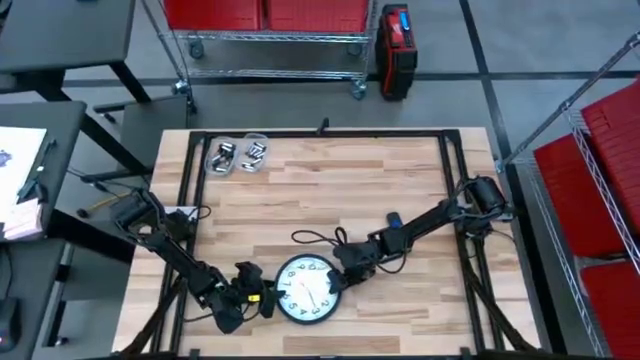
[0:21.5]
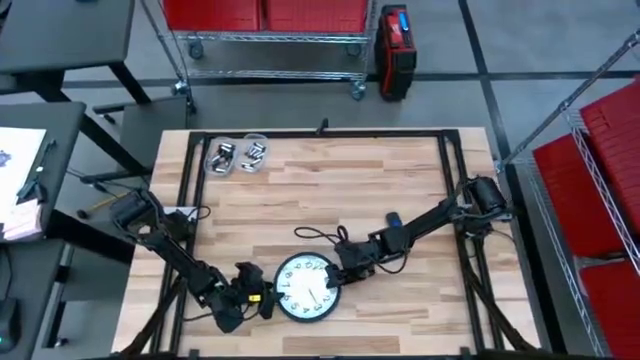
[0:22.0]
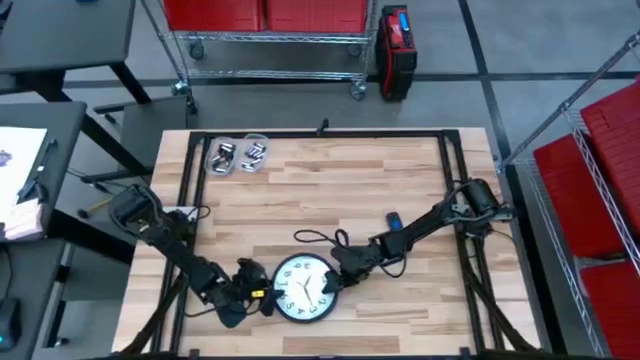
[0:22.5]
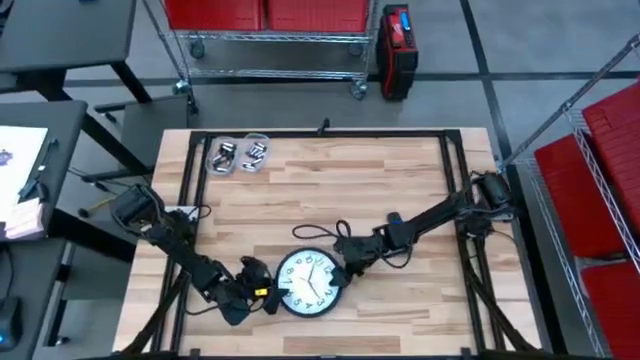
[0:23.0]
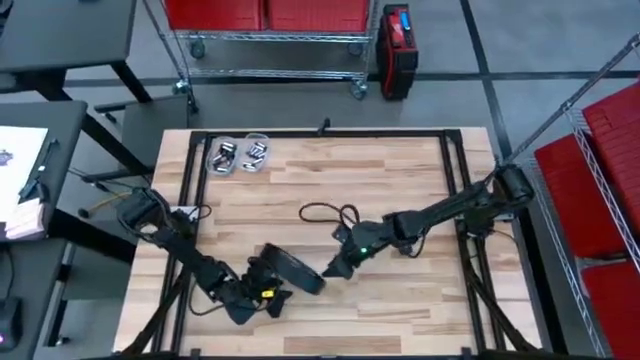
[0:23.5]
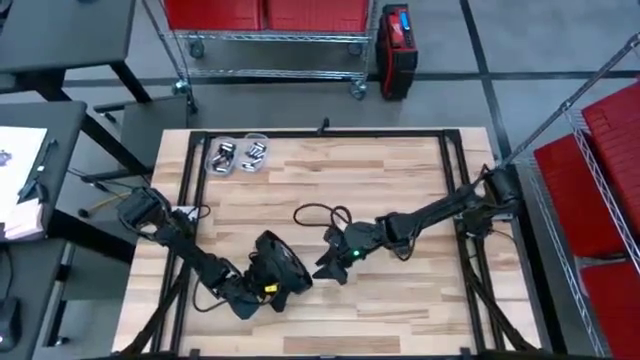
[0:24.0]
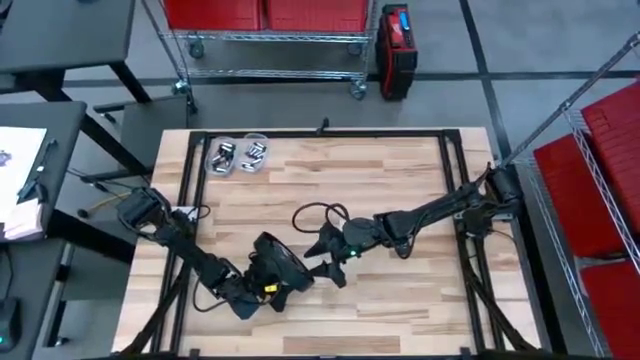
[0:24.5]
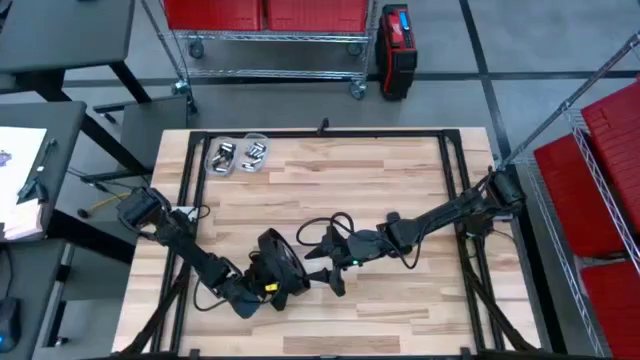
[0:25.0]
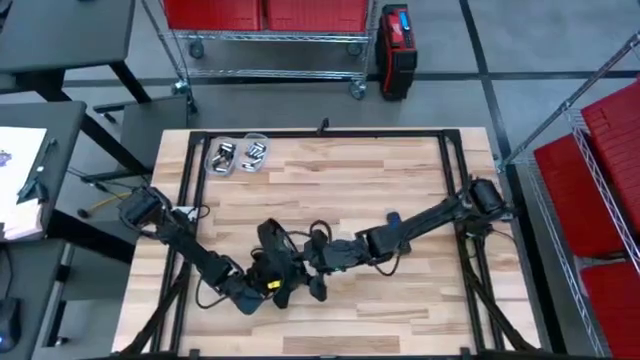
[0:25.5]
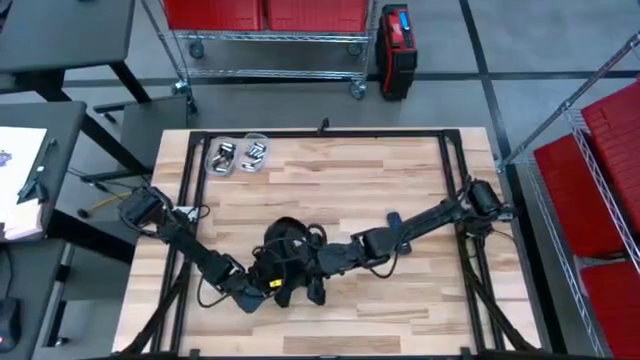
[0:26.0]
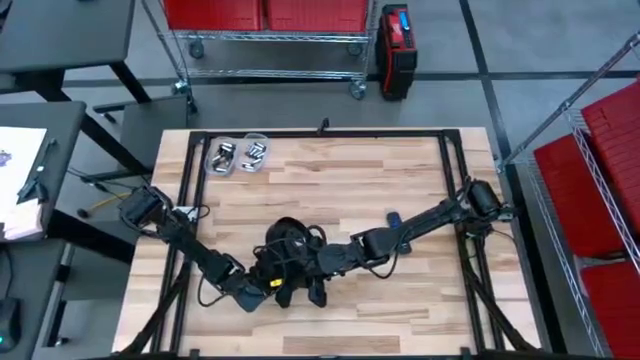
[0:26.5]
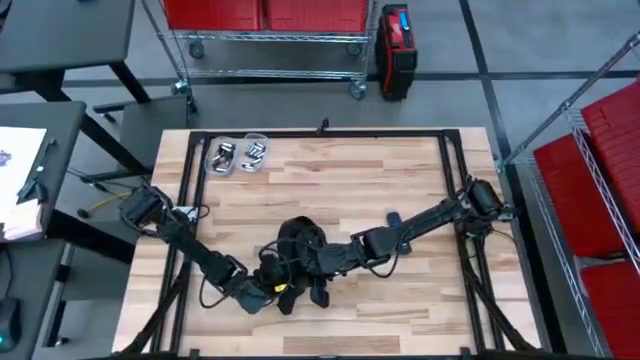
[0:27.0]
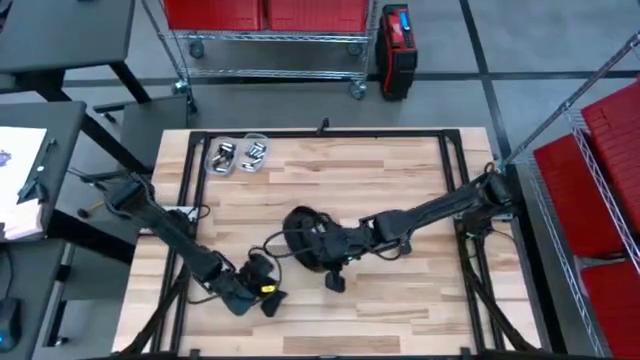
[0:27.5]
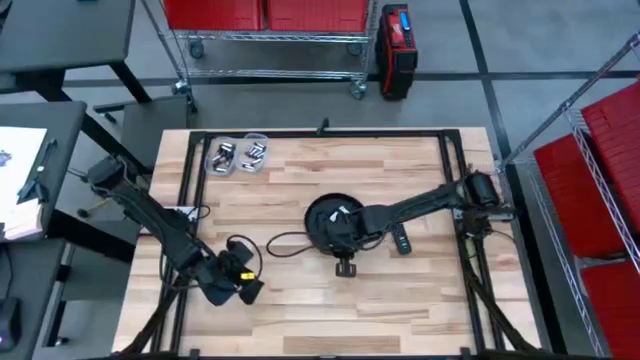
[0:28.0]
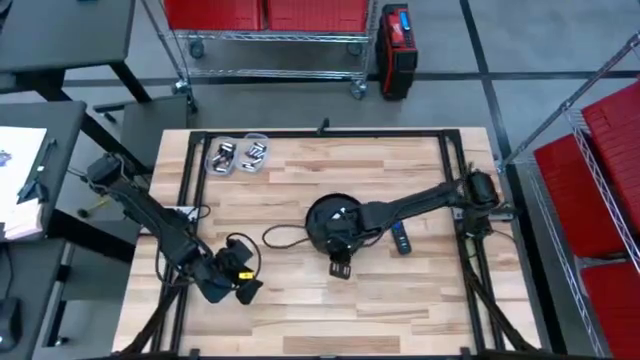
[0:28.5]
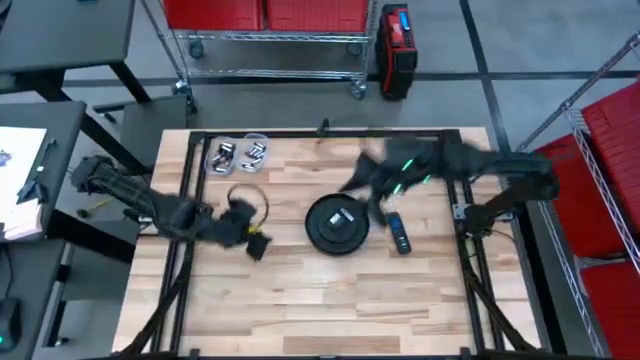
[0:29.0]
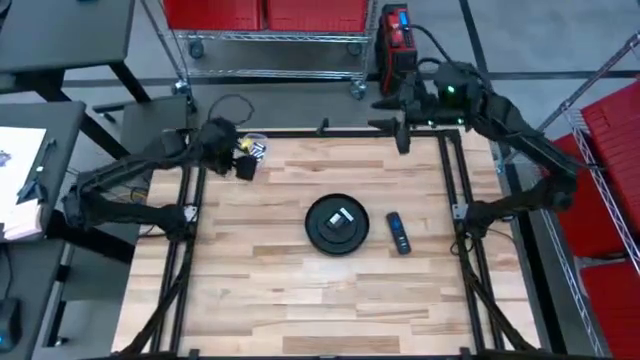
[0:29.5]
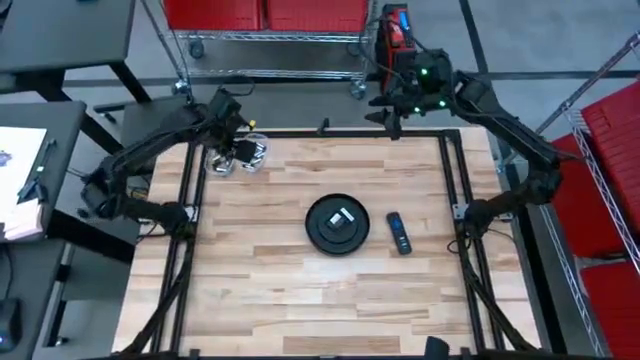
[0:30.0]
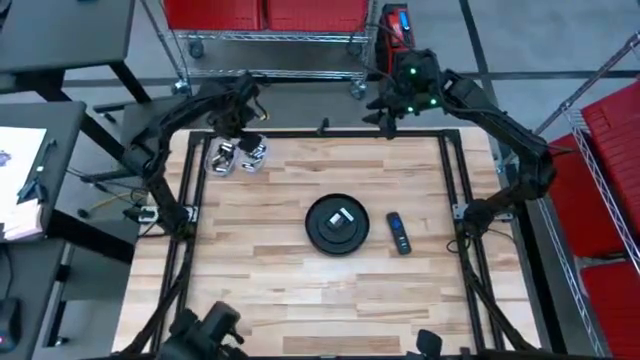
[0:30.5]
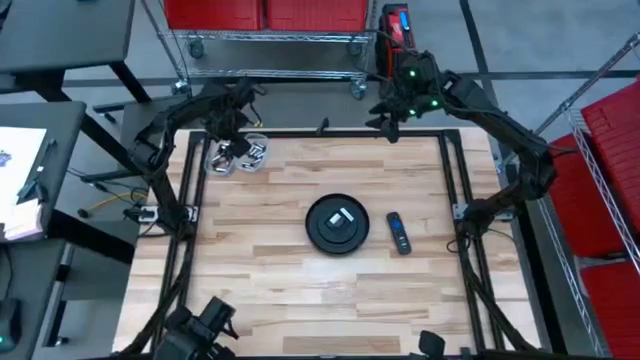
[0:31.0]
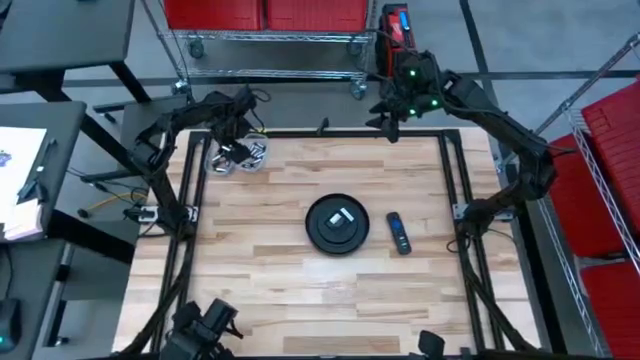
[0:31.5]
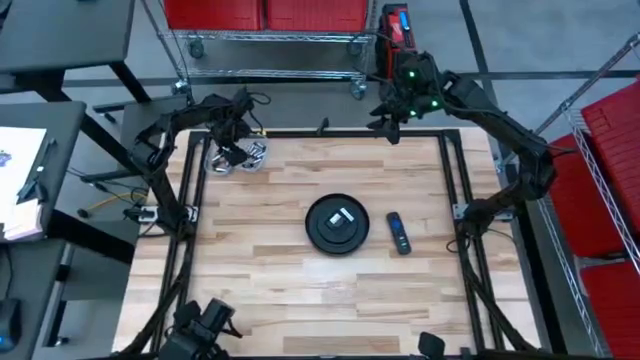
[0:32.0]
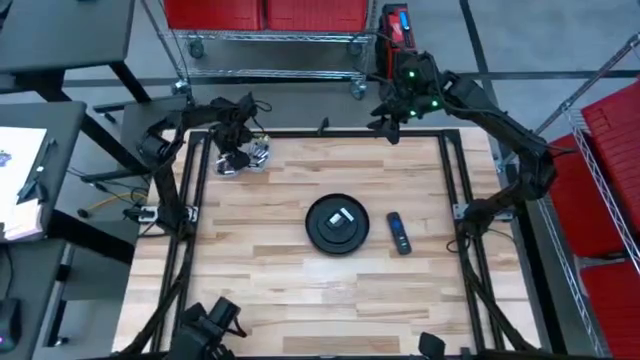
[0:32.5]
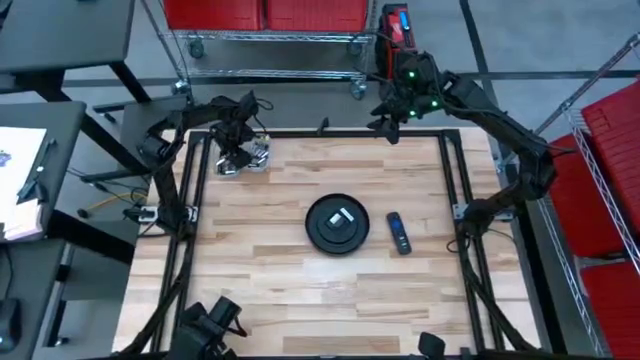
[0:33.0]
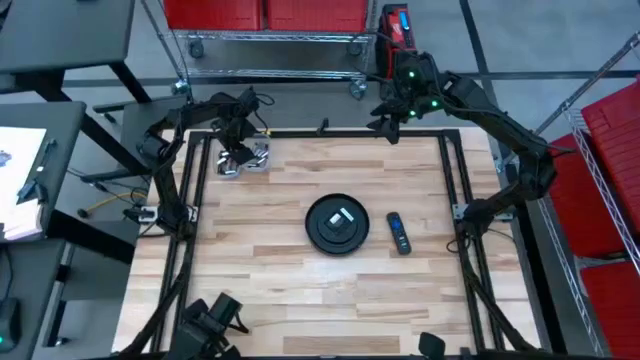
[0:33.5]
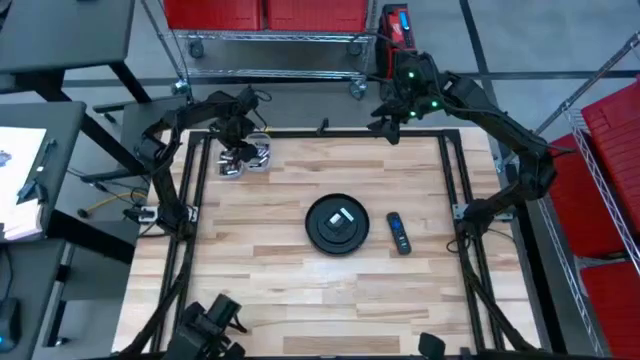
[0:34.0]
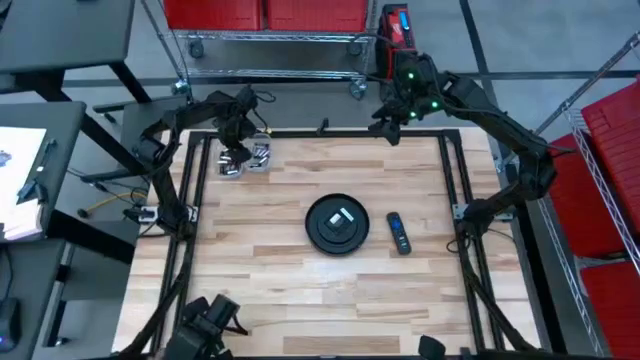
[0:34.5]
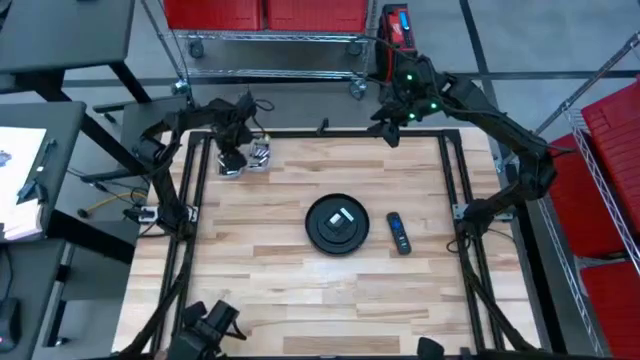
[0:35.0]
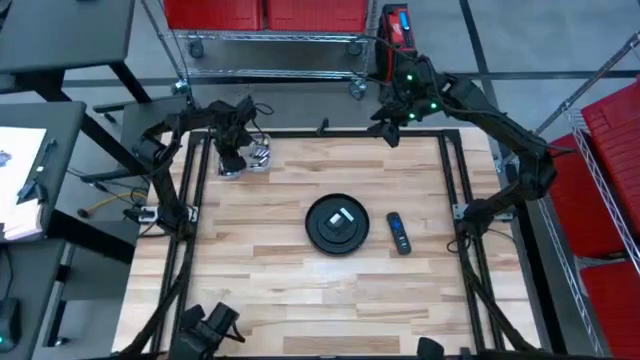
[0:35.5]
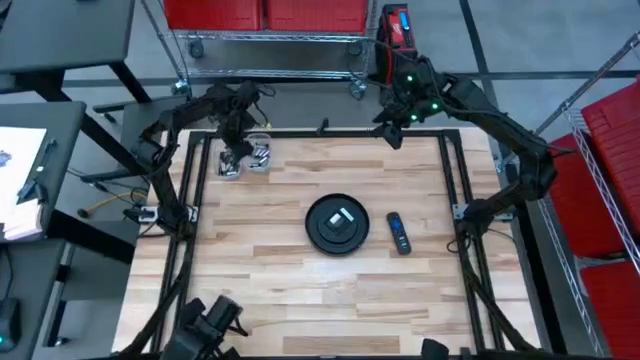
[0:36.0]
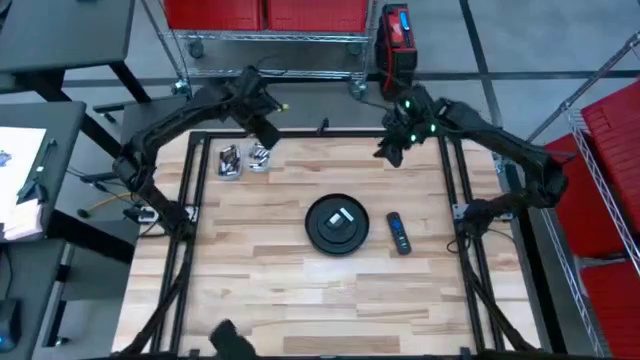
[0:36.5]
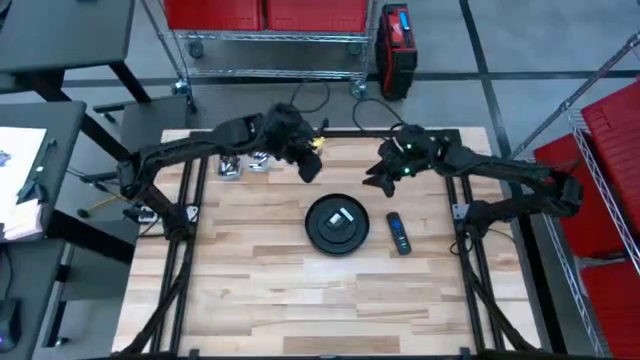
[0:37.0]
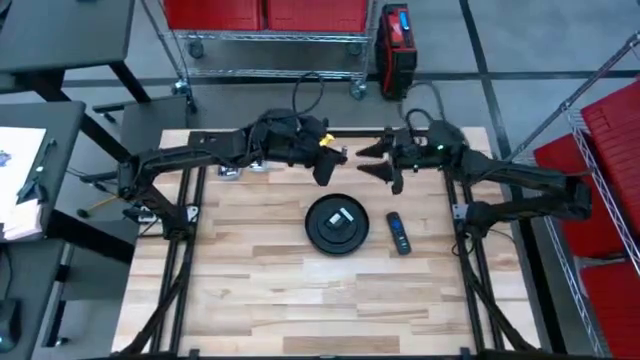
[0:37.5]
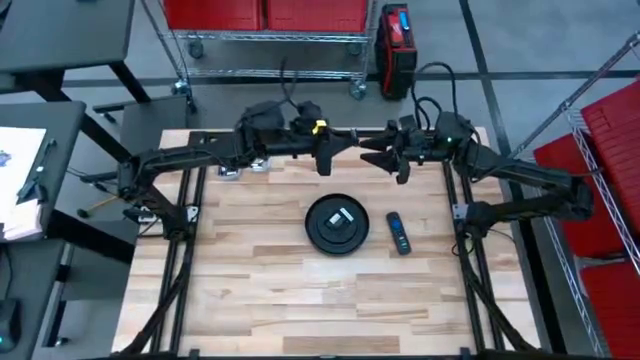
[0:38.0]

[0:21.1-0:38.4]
Task: Insert battery
Insert the silver battery into the wall clock battery compartment

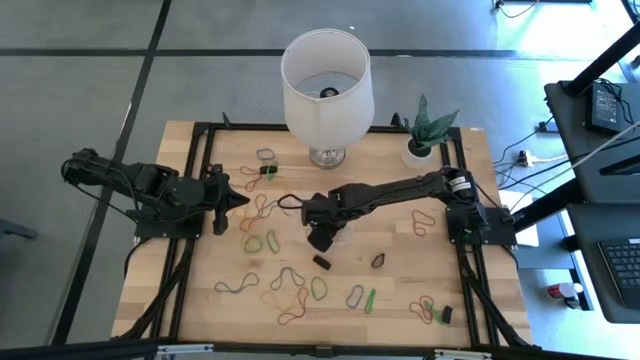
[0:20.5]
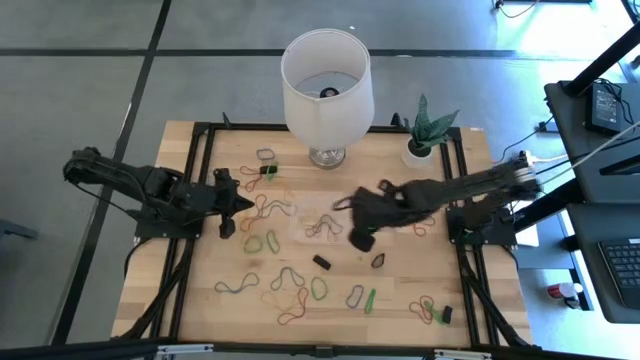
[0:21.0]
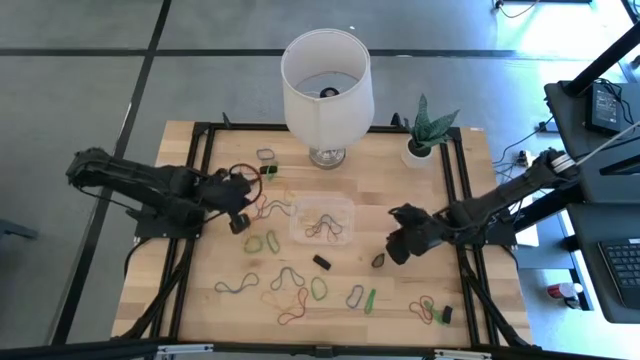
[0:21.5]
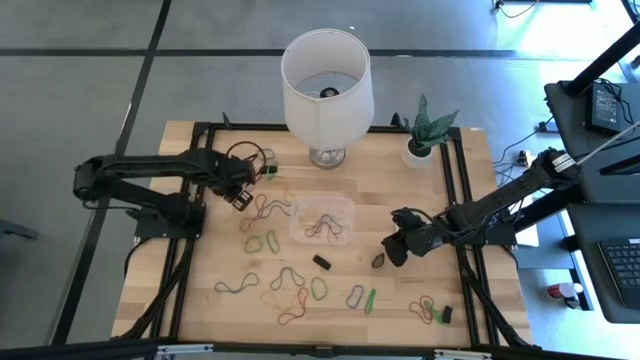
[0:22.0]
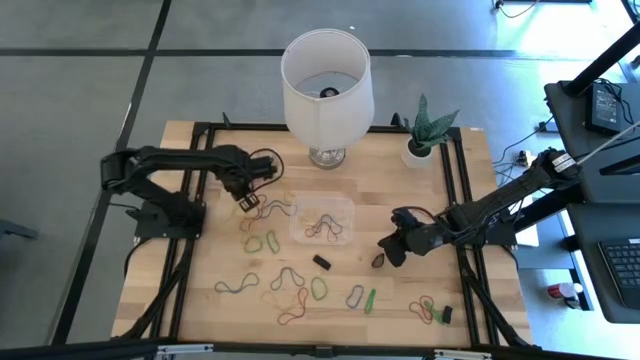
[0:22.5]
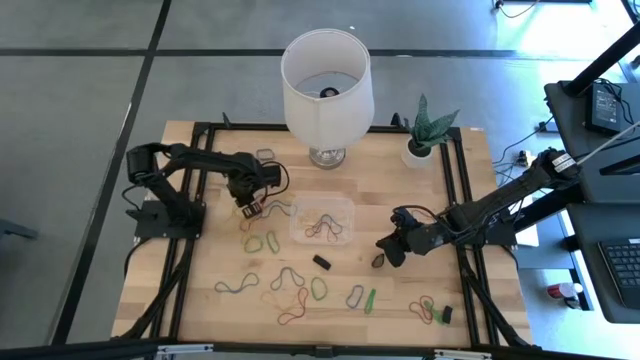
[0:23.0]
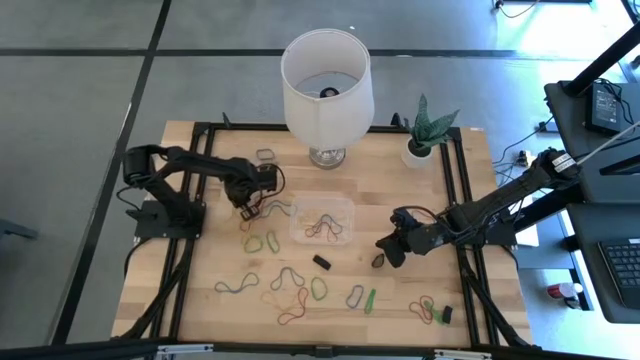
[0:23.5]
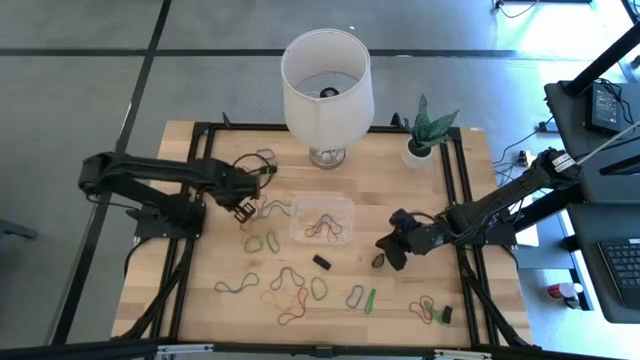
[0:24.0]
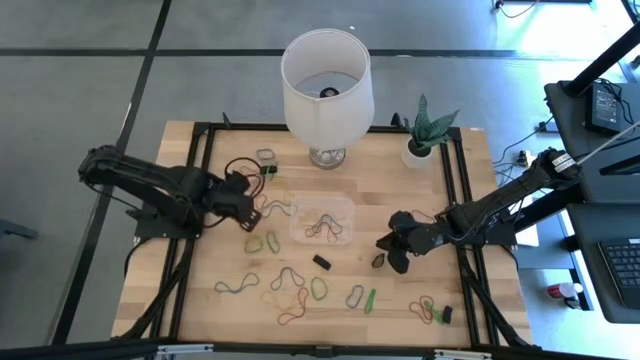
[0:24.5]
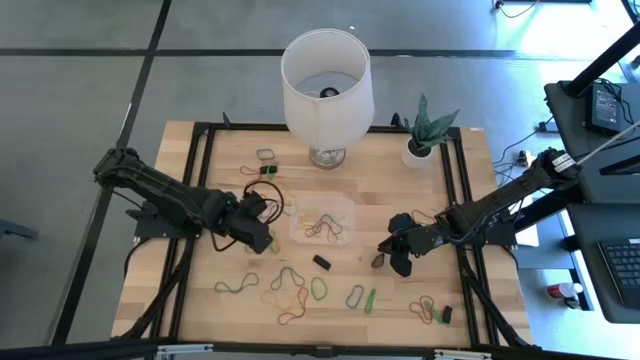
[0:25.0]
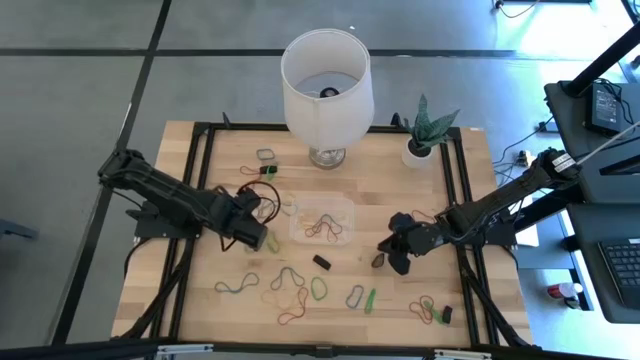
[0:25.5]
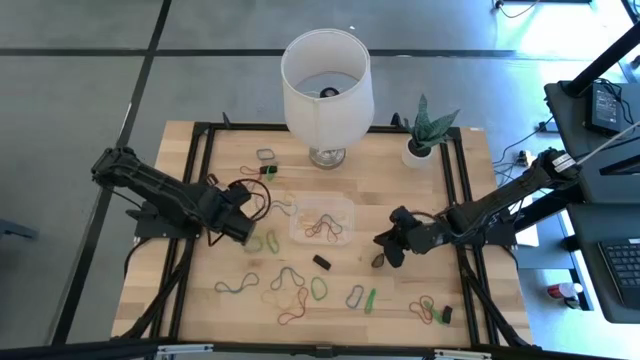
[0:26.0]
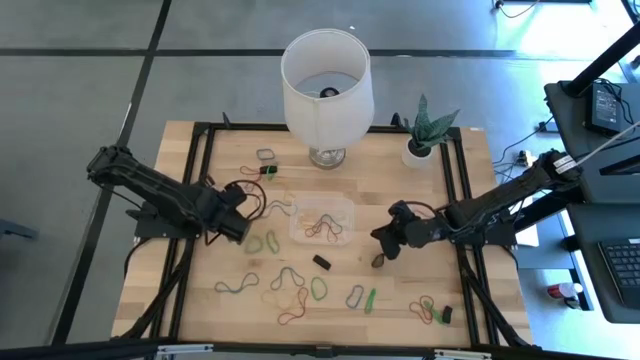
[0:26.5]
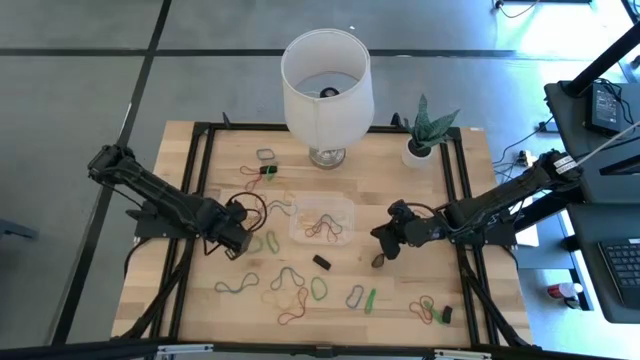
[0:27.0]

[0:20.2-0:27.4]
Task: Pick and place rubber bands into bin
Put the yellow rubber band into the container
